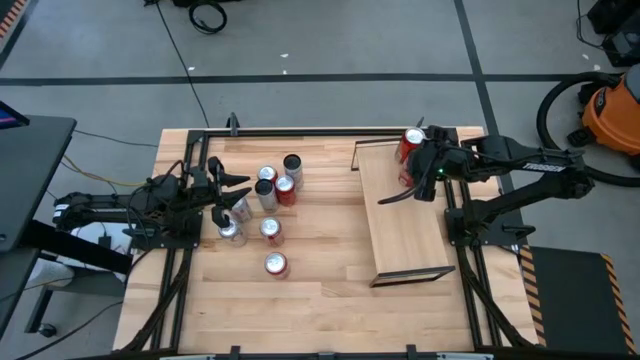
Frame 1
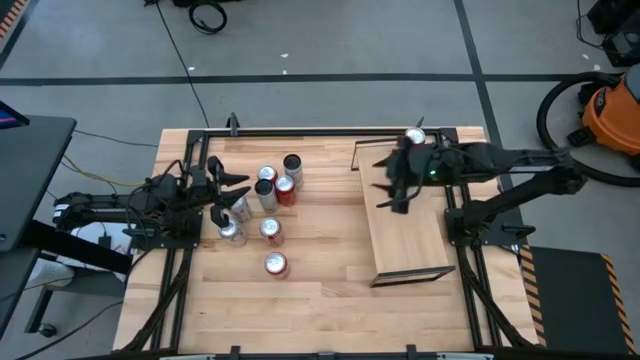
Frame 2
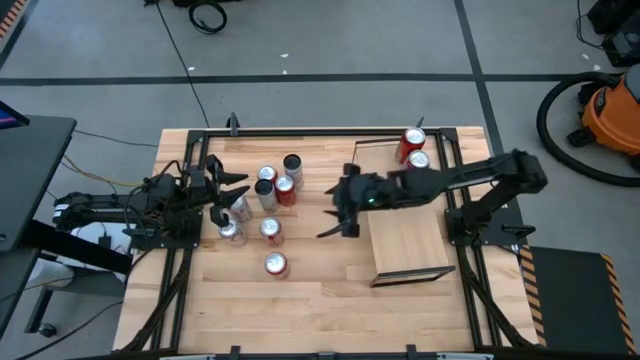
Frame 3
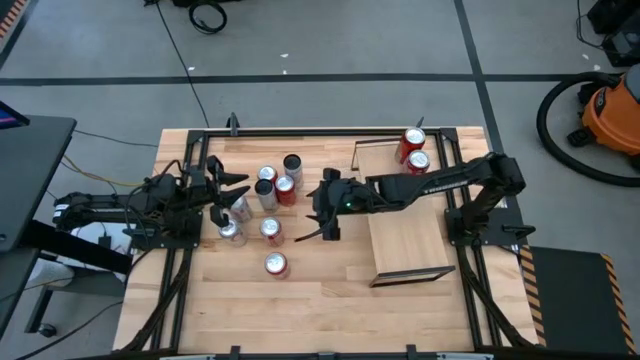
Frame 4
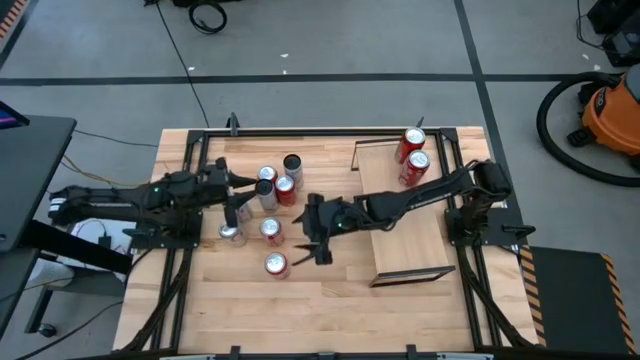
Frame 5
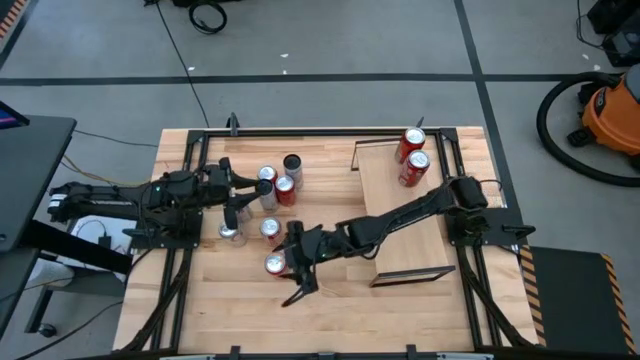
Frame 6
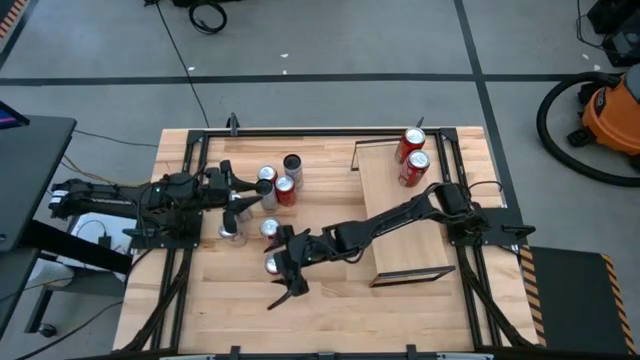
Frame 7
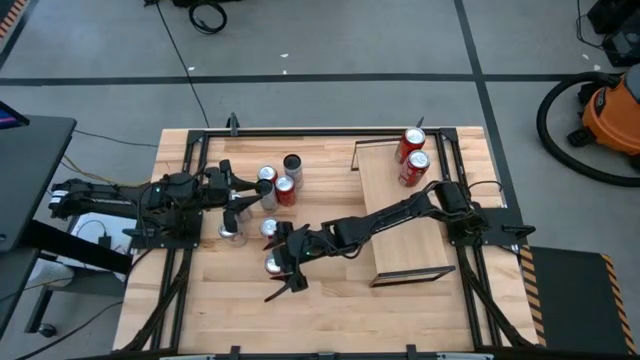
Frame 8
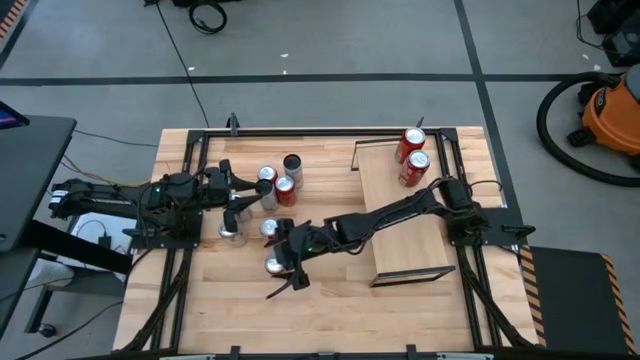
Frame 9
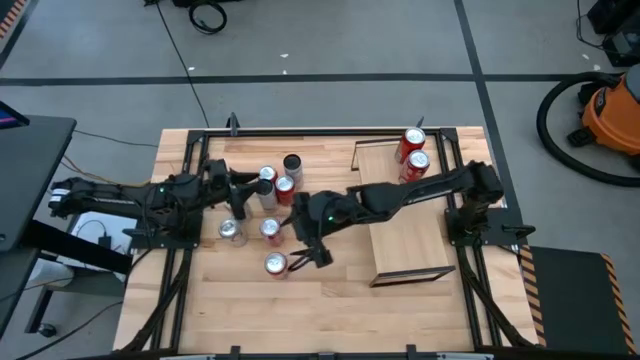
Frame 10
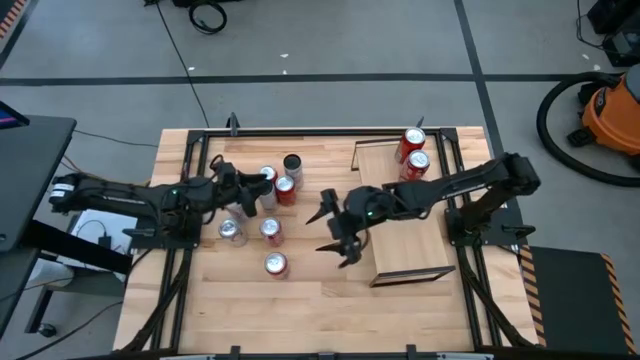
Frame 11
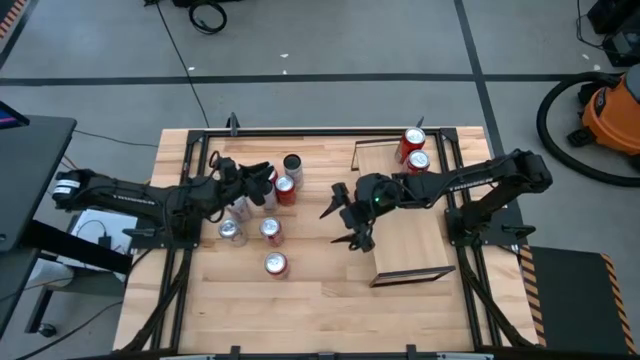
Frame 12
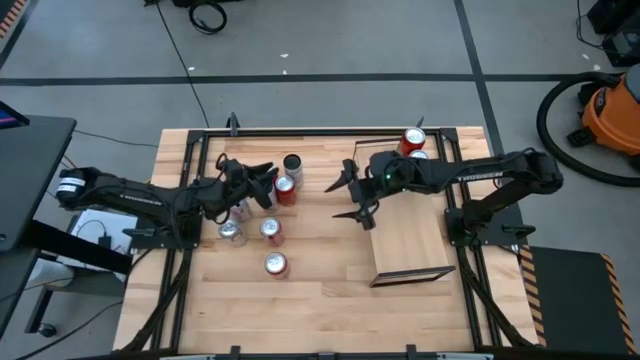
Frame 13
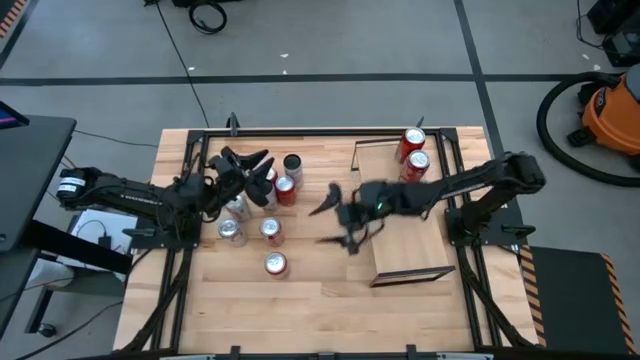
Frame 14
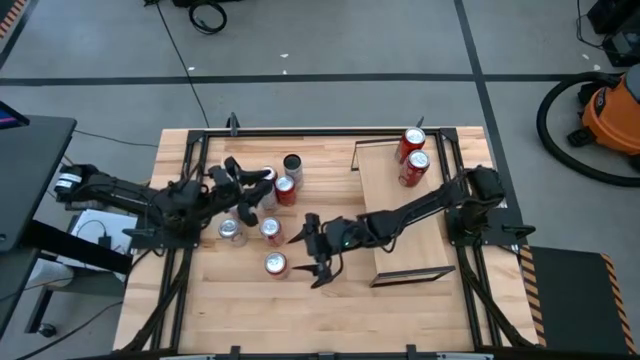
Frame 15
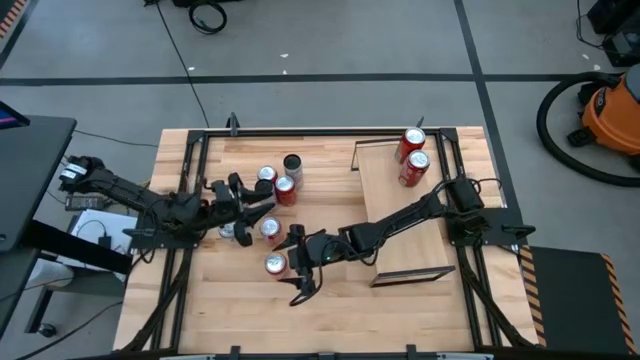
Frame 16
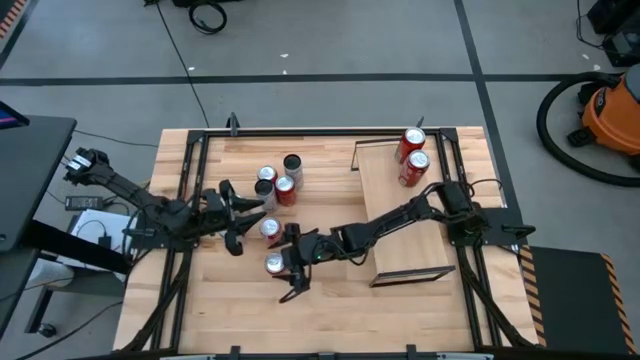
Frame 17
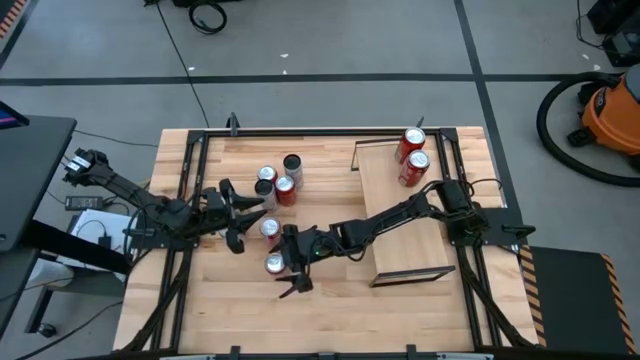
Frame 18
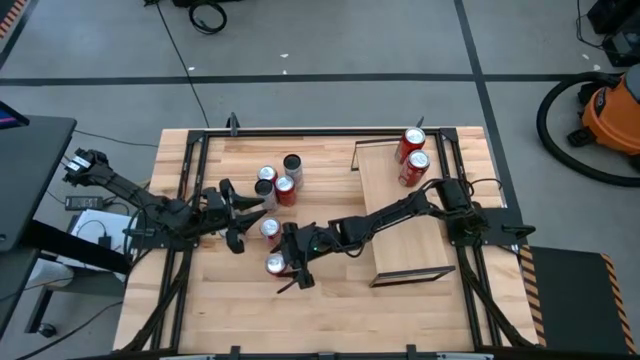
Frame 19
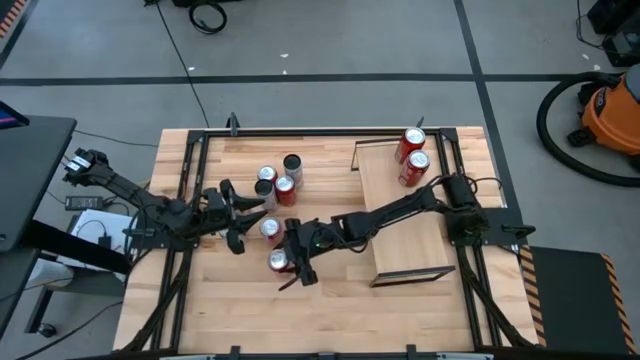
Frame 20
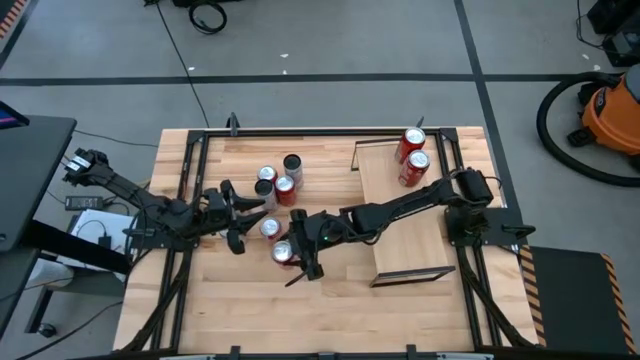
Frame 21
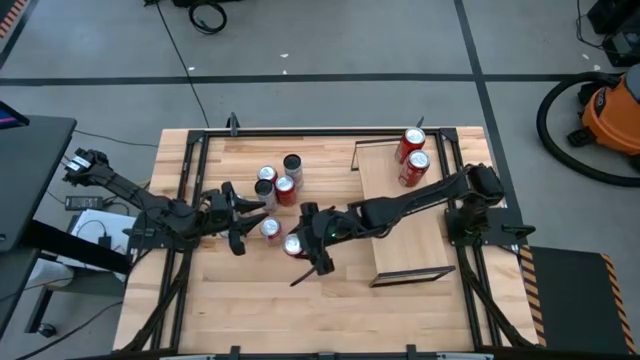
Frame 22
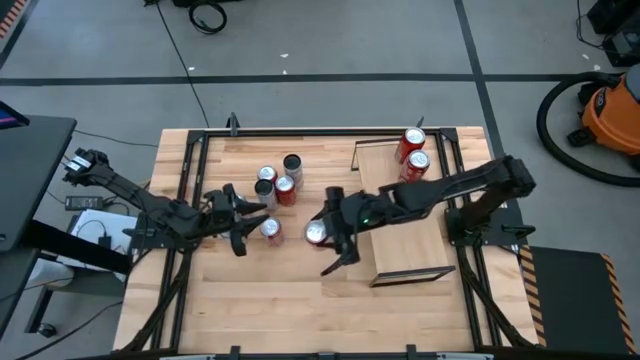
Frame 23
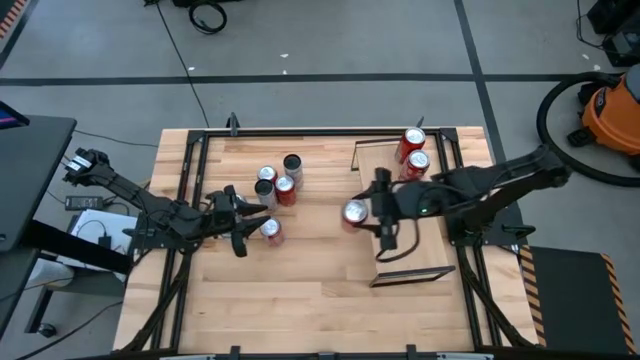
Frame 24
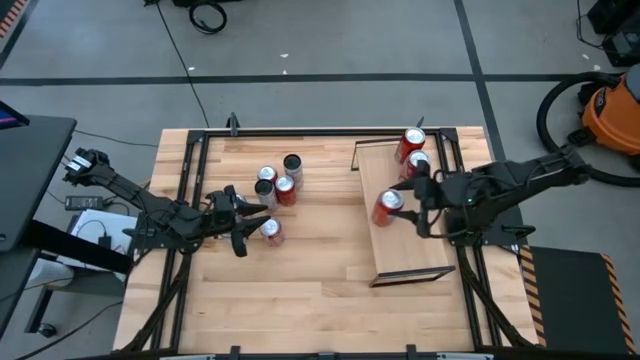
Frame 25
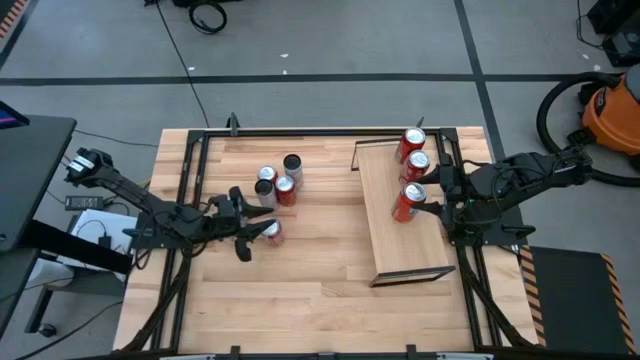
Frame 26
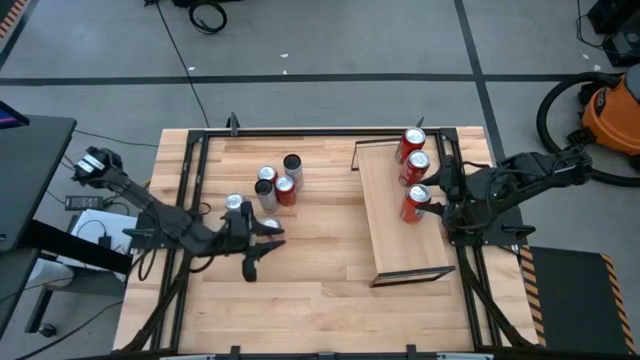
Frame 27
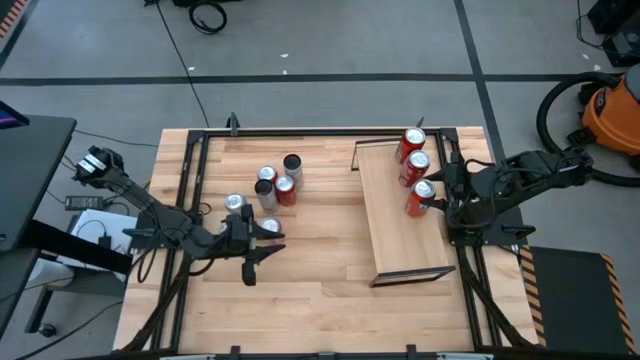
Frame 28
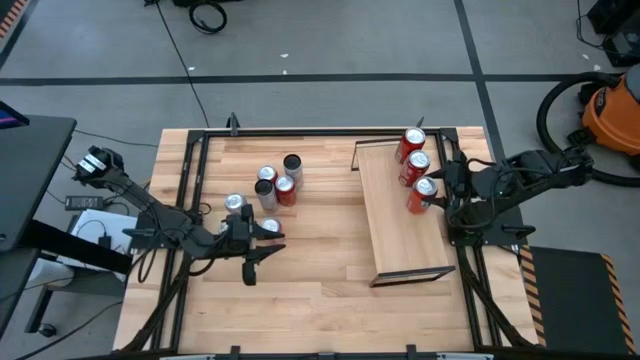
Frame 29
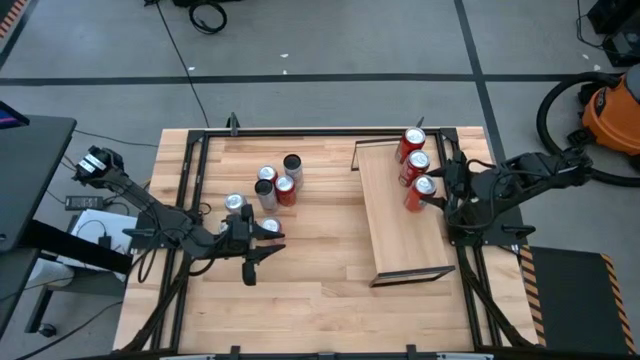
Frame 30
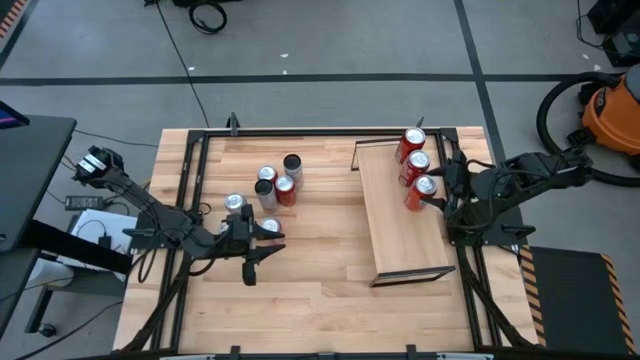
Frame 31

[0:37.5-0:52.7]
Task: Place canned beverage on shelf
Put the bottom red soda can on the shelf

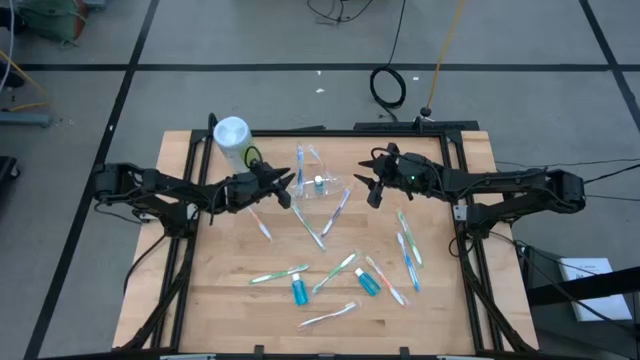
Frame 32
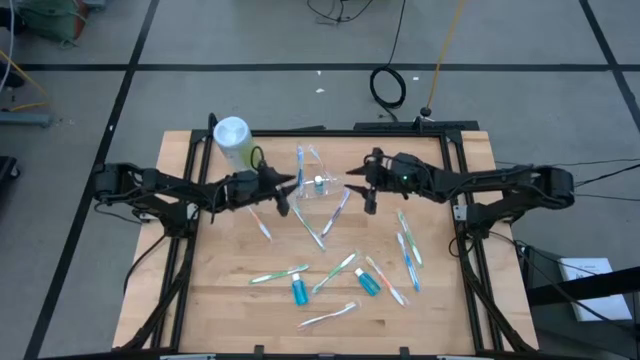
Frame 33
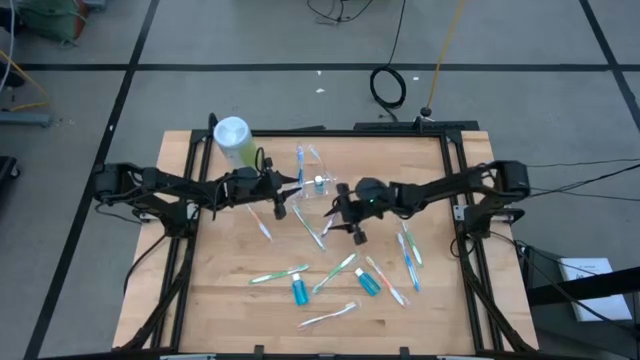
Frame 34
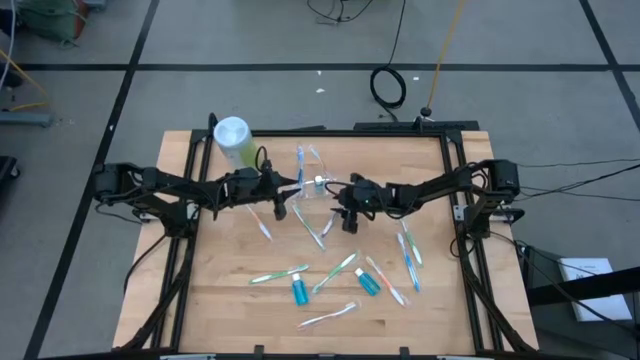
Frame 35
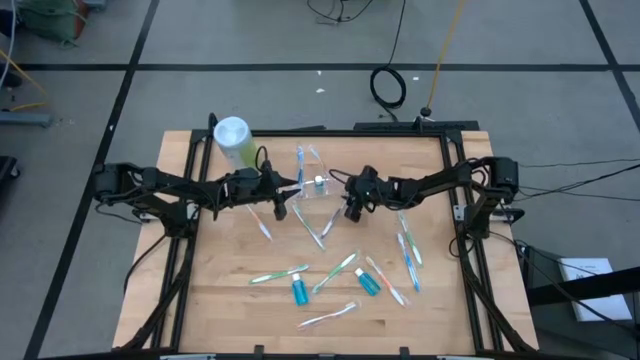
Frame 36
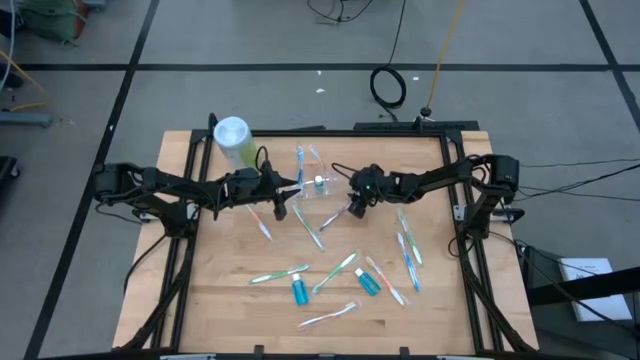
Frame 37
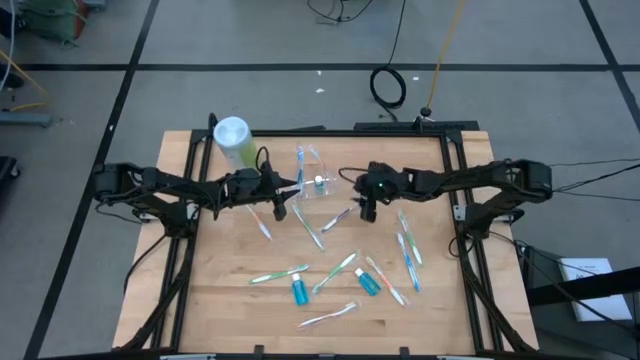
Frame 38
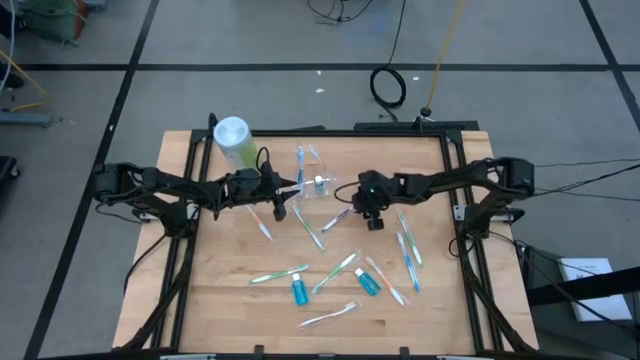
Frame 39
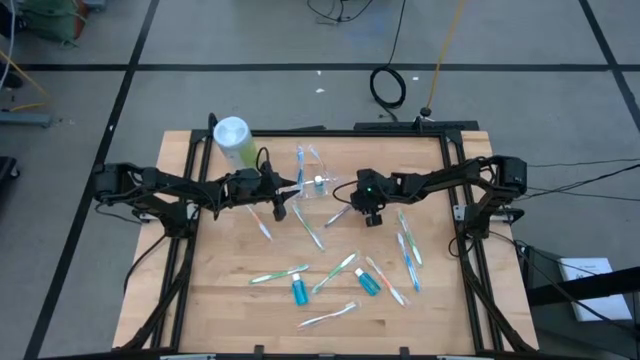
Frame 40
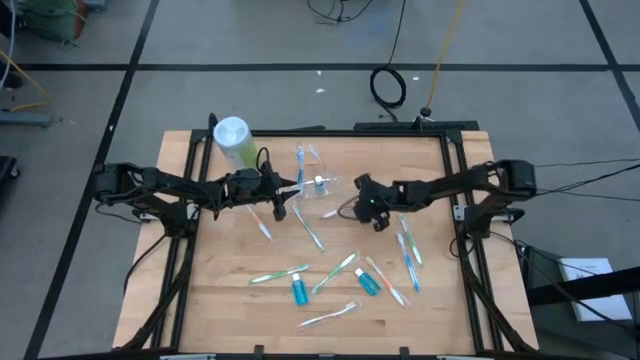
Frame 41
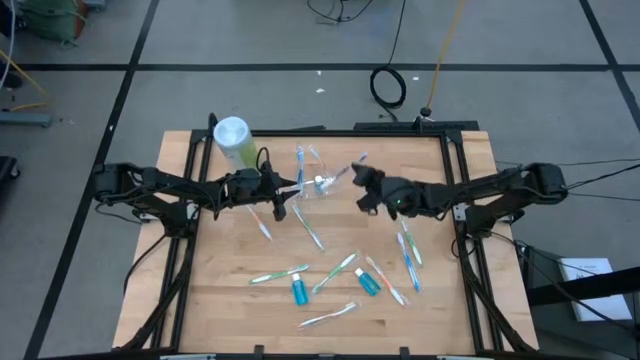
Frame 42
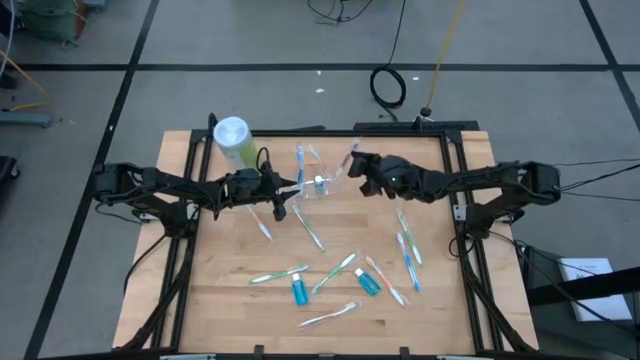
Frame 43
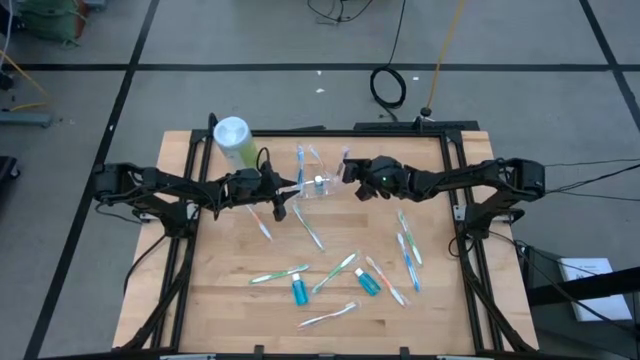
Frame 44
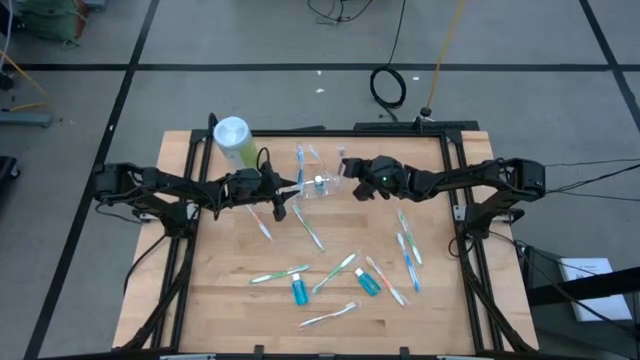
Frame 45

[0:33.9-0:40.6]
Task: Pick & Place toothbrushing station
Put the purple toothbrush into the transparent organizer
